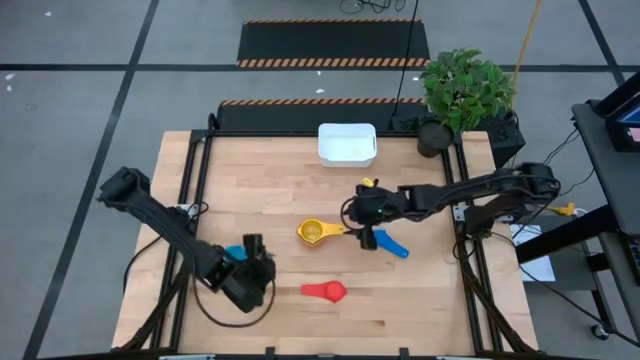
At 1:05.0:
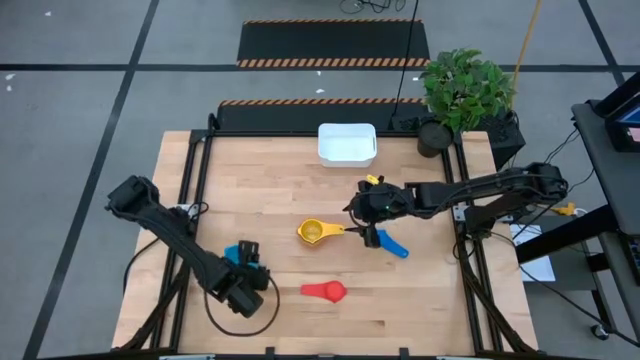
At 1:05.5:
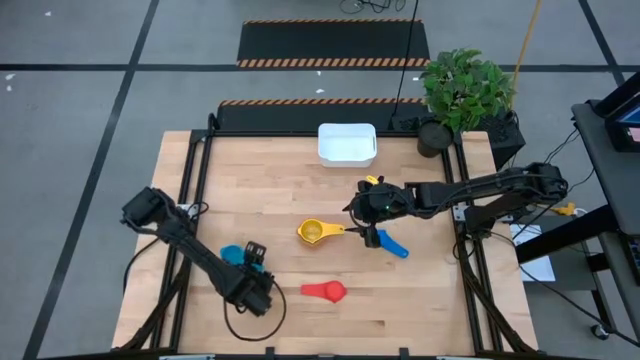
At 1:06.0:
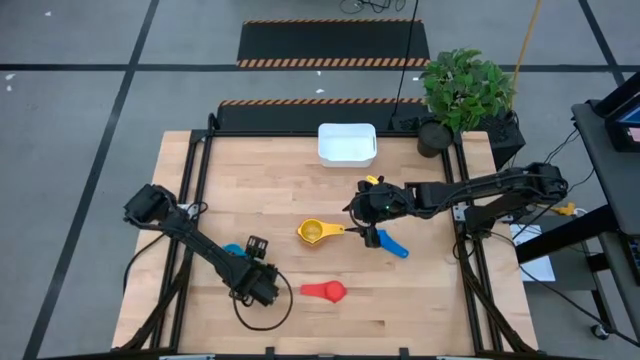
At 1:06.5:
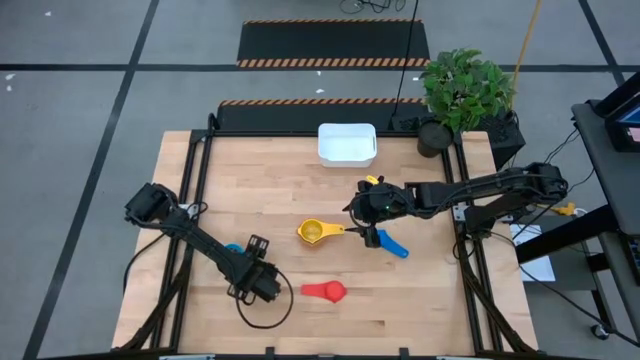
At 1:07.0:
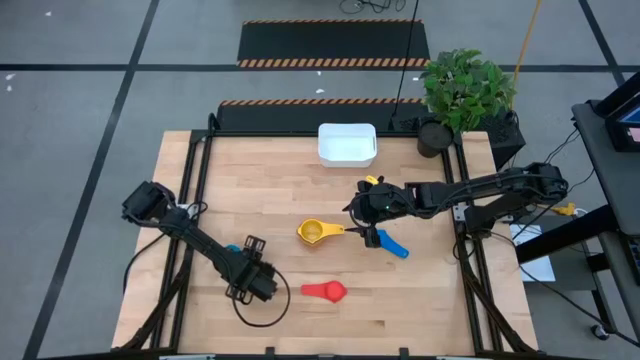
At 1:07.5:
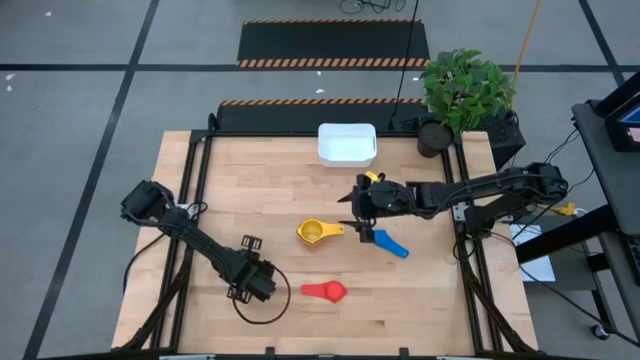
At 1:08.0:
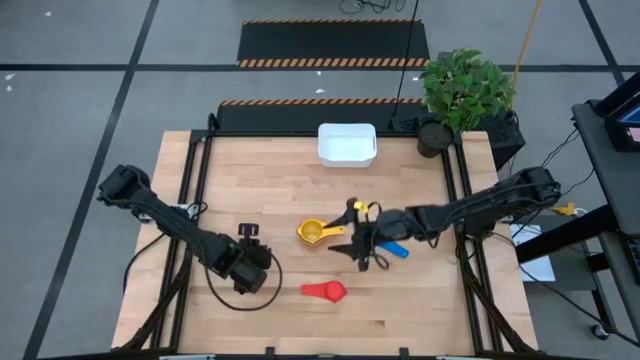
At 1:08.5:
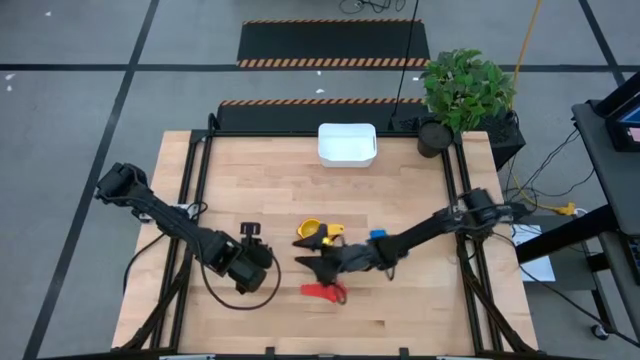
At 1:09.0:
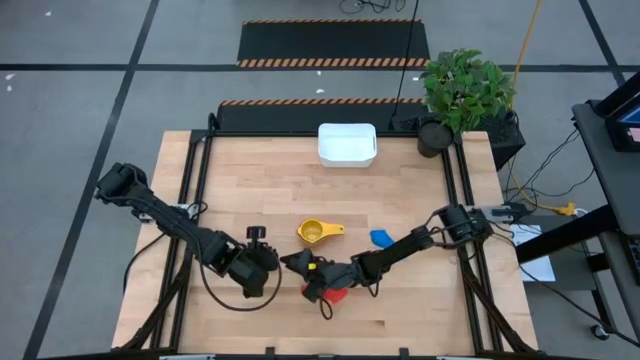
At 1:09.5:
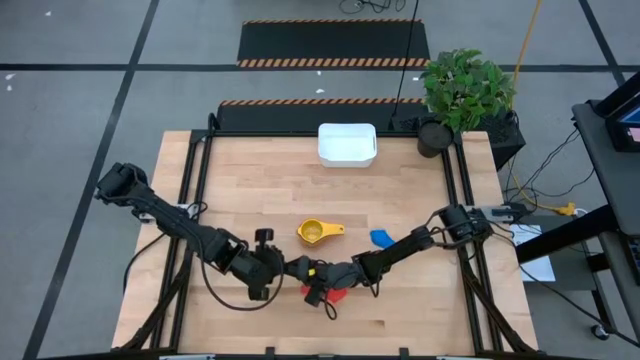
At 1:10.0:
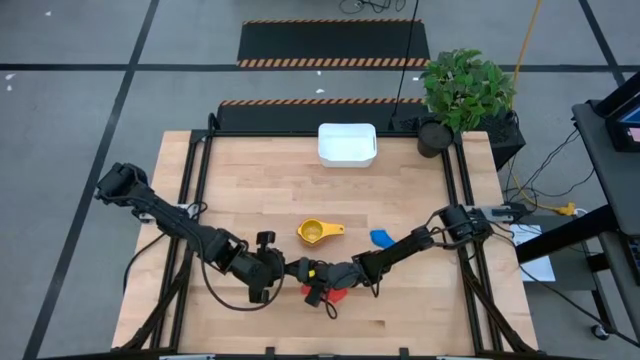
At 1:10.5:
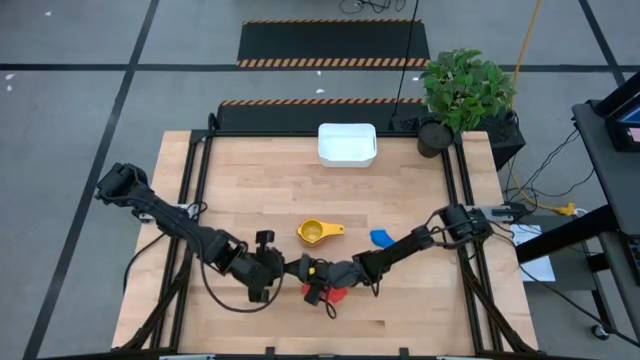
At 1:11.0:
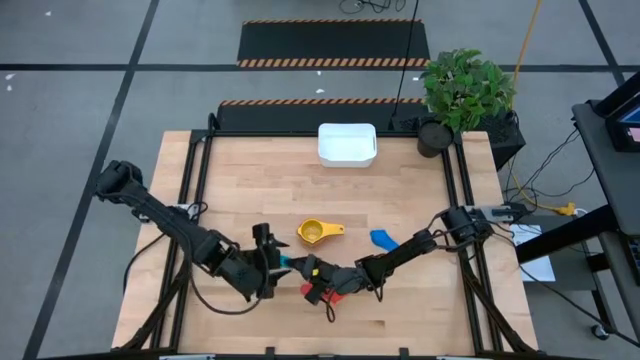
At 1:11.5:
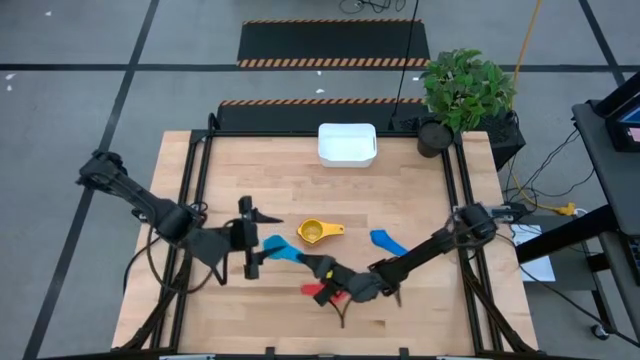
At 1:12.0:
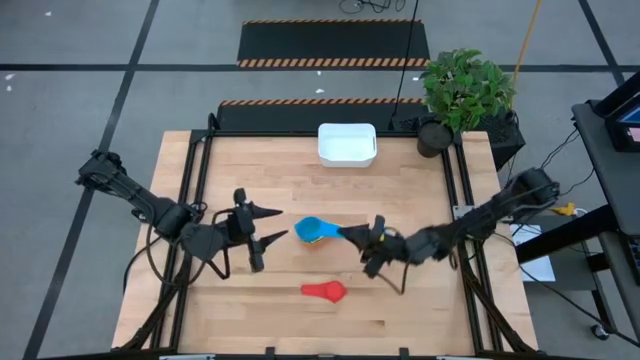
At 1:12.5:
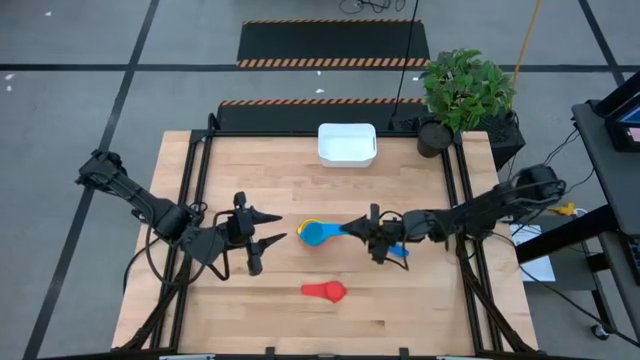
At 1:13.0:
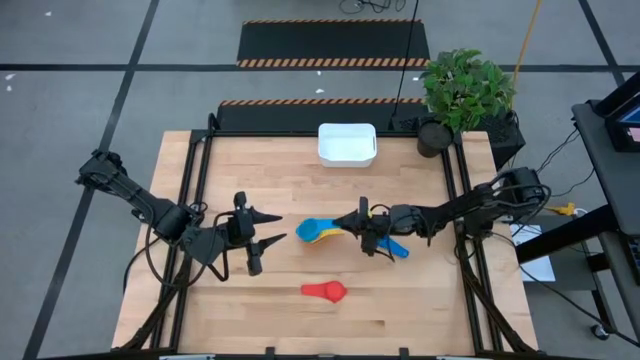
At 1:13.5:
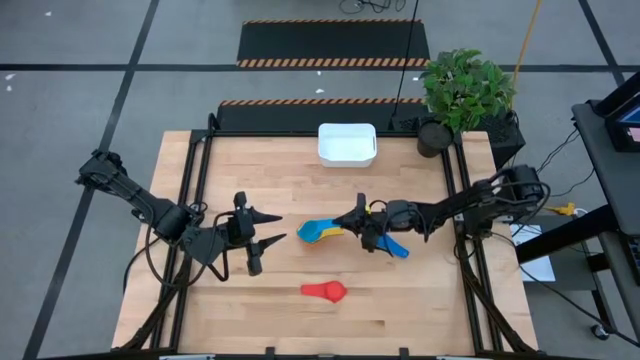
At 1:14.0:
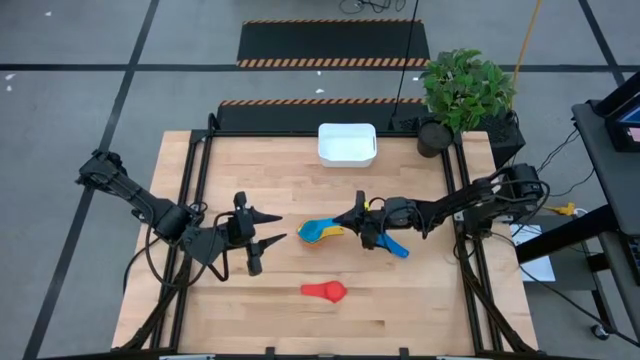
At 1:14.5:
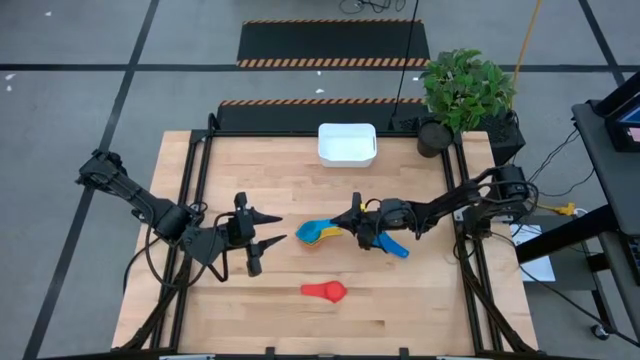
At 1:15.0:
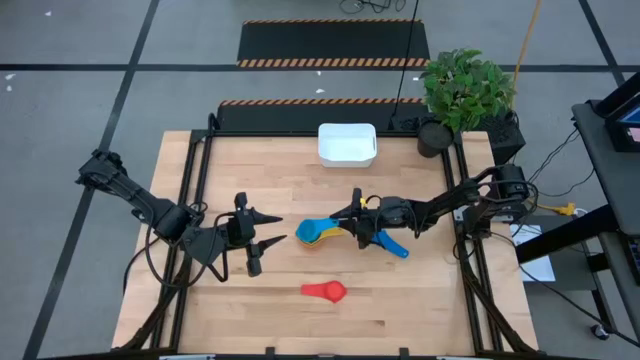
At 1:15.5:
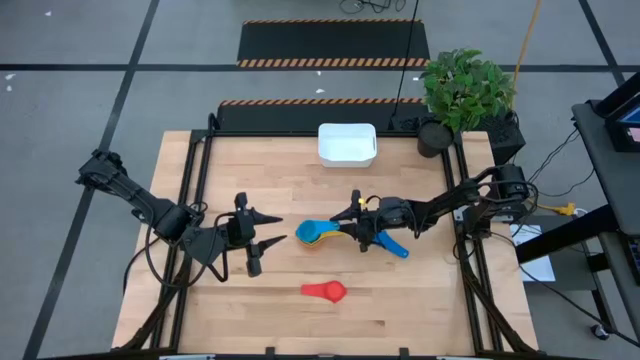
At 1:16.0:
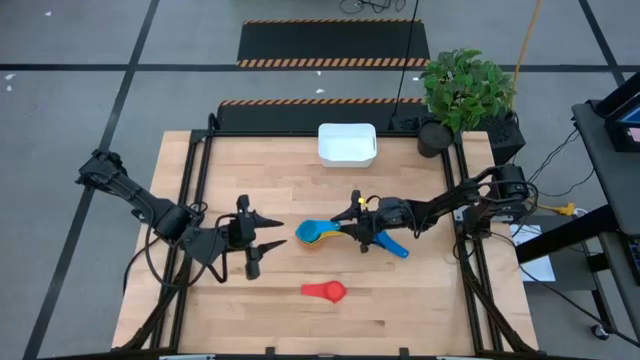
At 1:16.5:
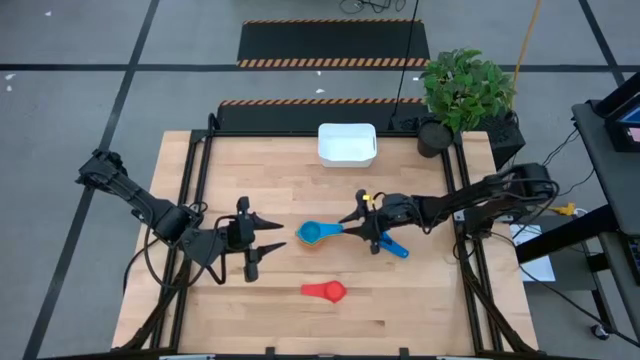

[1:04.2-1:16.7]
Task: Nest measuring cups in basket
Stack the light blue measuring cup into the yellow measuring cup

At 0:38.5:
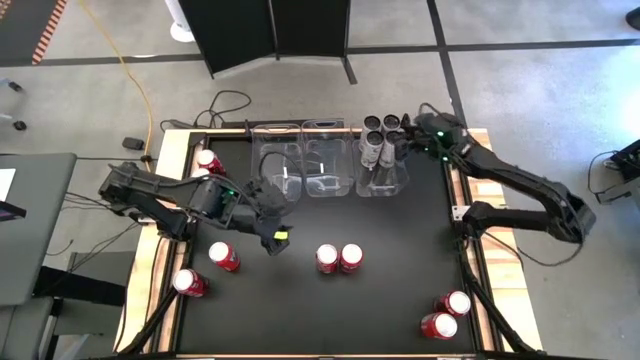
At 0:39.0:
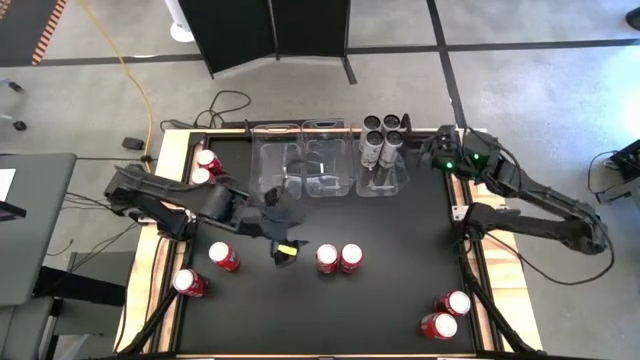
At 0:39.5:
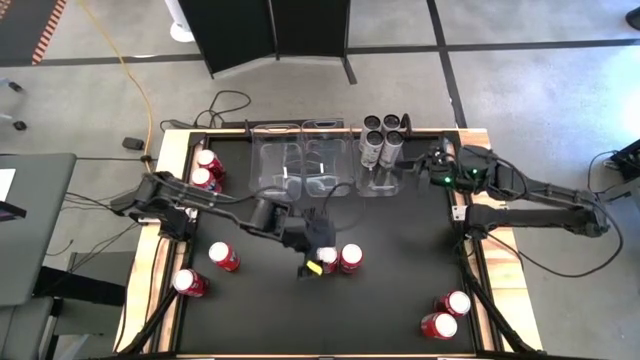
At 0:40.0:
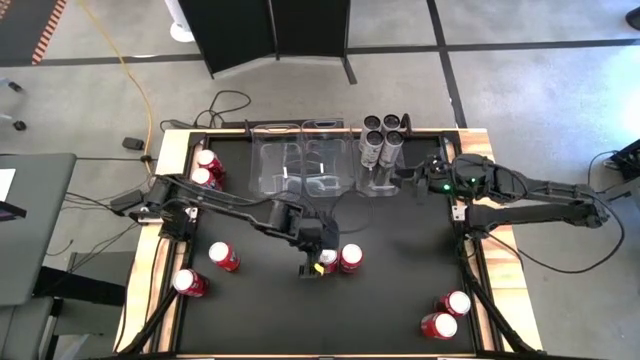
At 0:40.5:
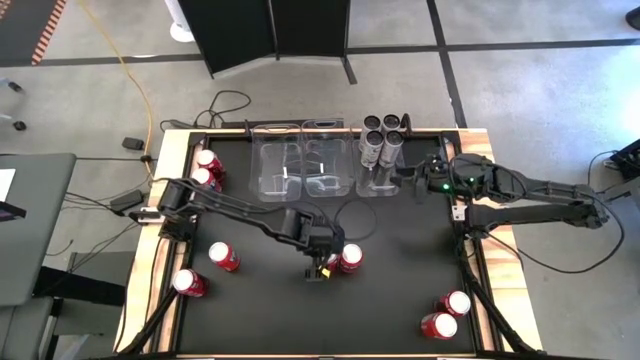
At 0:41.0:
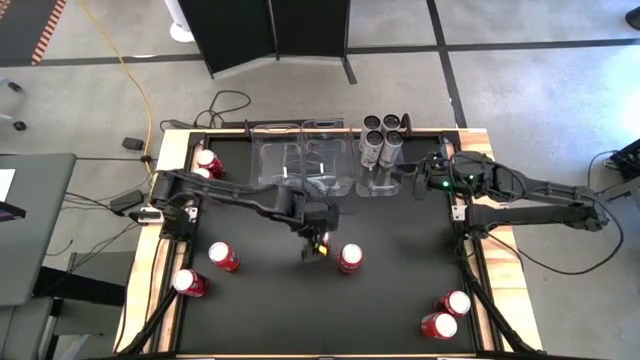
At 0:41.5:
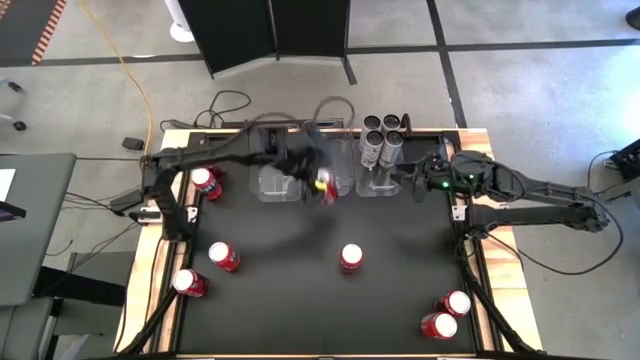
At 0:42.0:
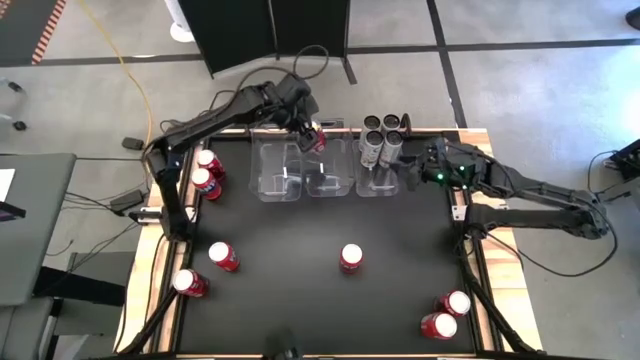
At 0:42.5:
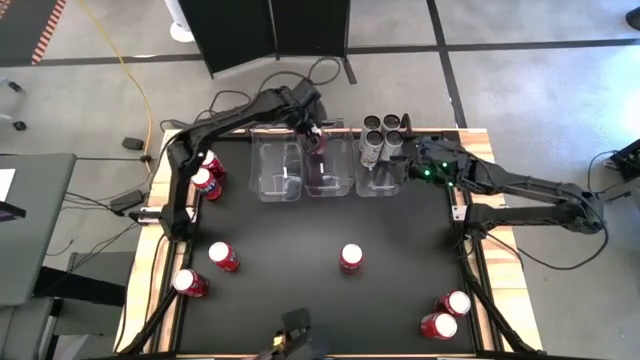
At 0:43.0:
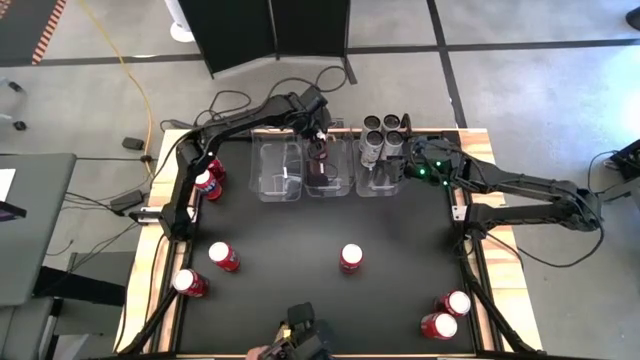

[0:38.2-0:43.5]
Task: Sort soda cans
Put the middle right red-white soda can into the center transparent bin
